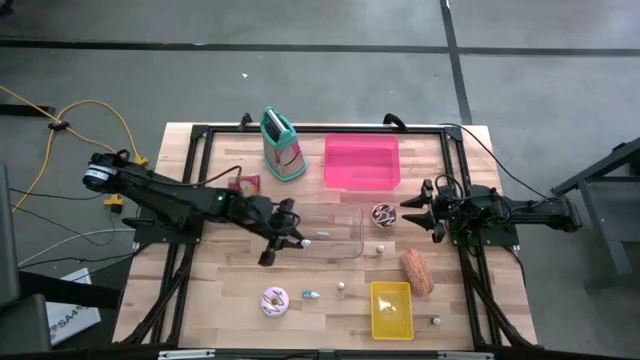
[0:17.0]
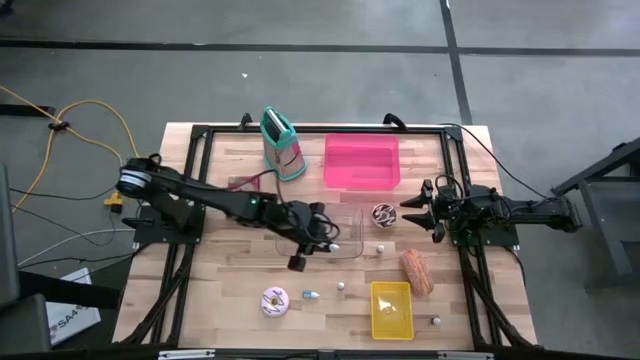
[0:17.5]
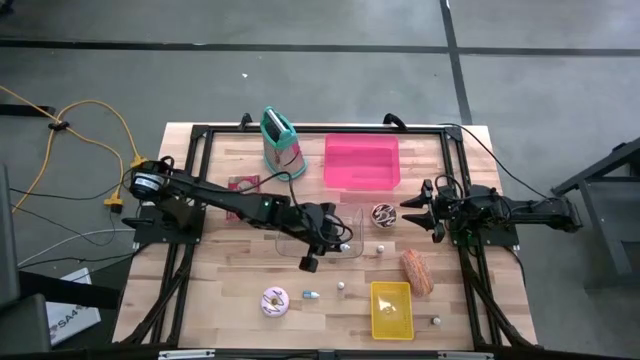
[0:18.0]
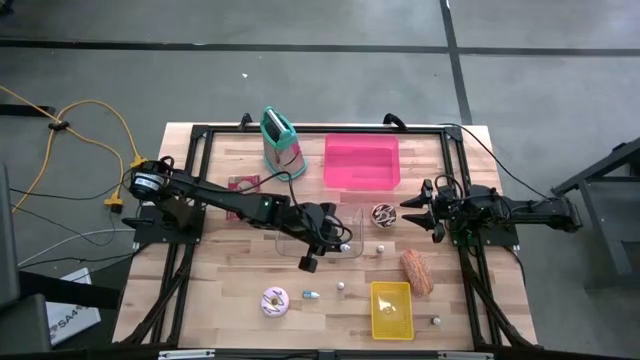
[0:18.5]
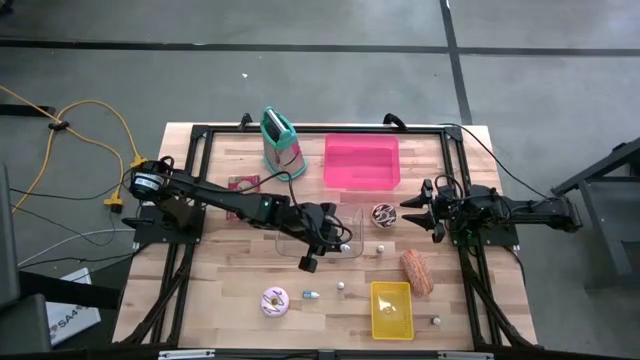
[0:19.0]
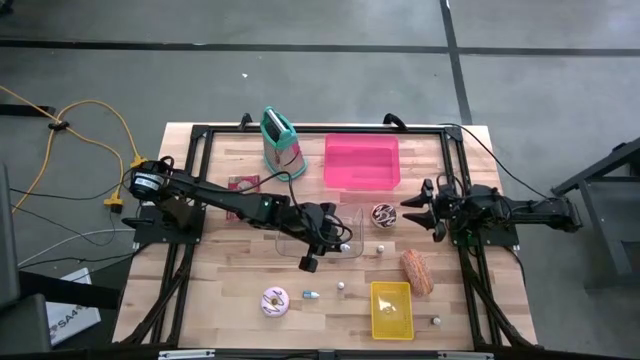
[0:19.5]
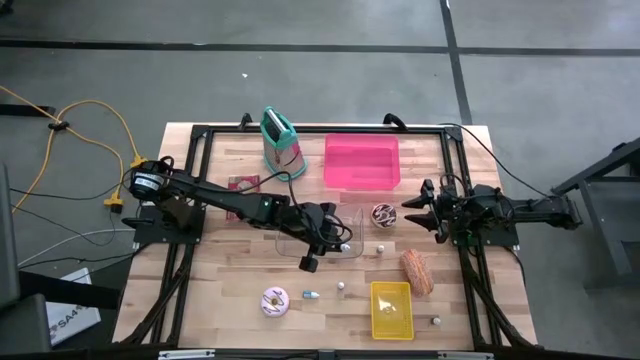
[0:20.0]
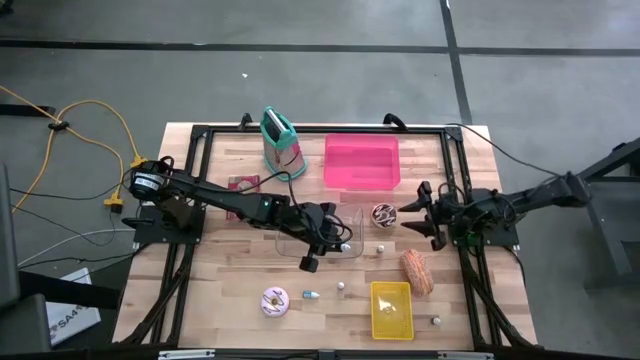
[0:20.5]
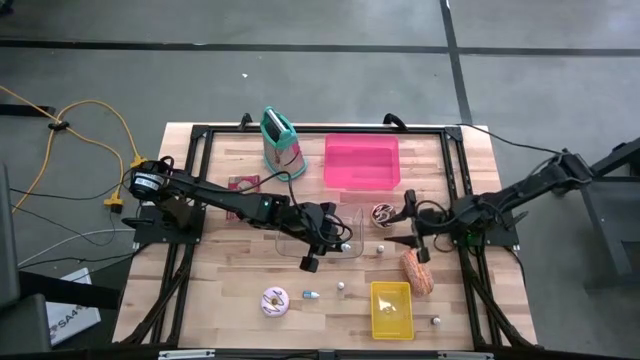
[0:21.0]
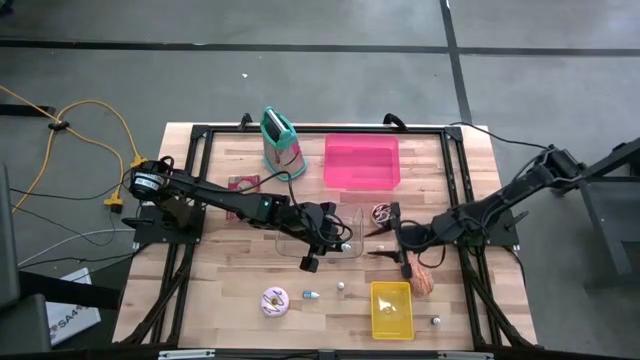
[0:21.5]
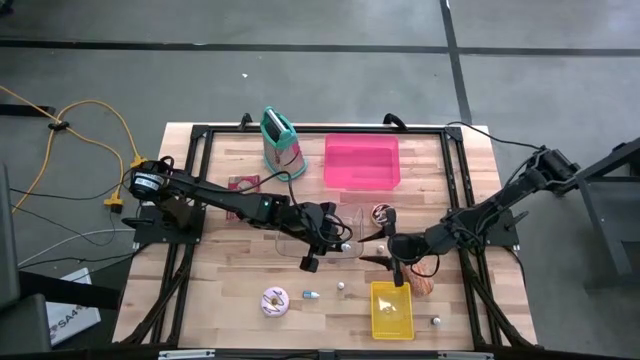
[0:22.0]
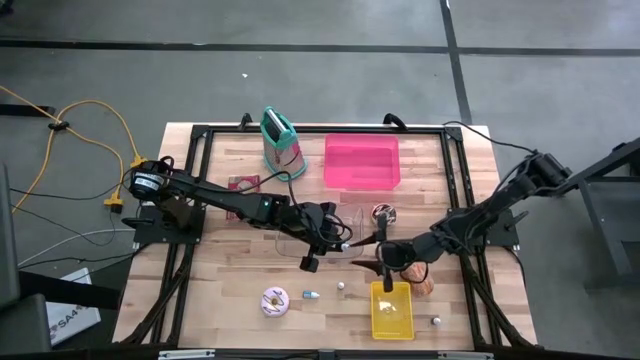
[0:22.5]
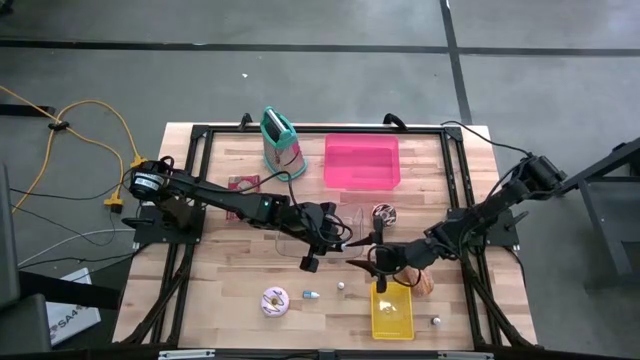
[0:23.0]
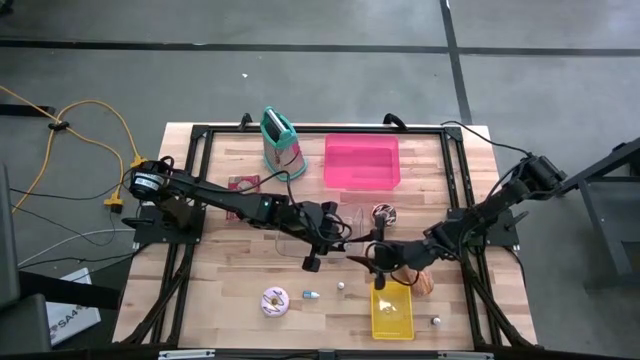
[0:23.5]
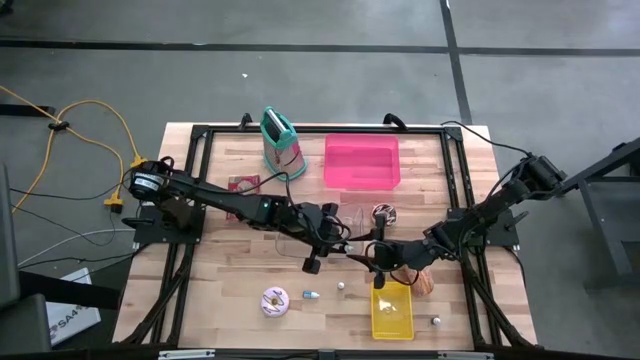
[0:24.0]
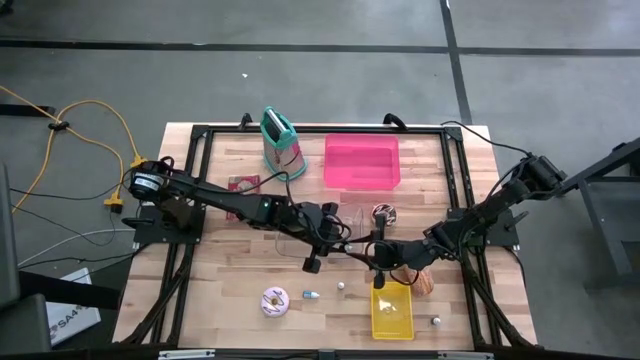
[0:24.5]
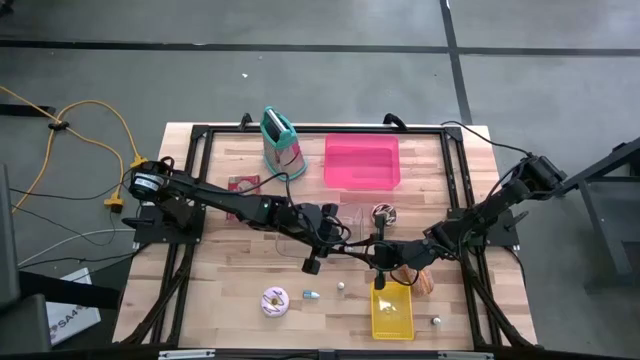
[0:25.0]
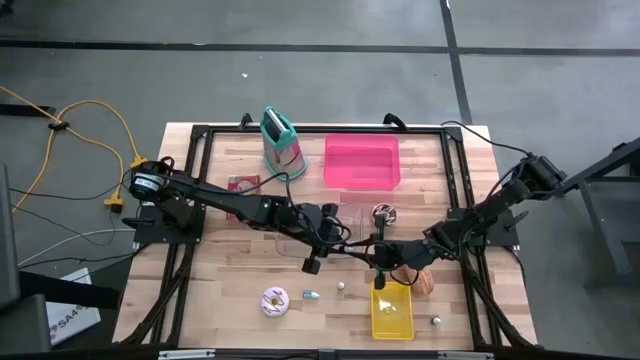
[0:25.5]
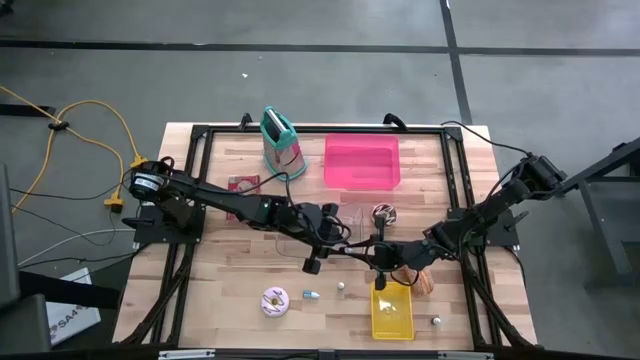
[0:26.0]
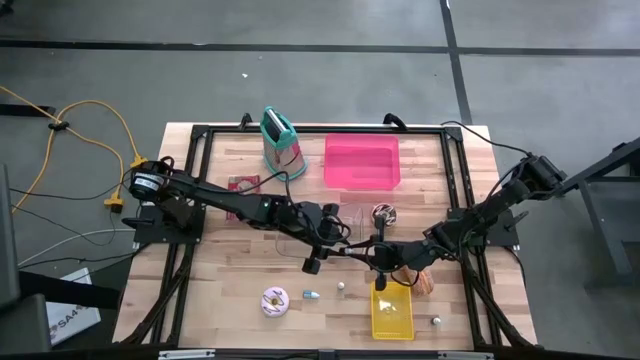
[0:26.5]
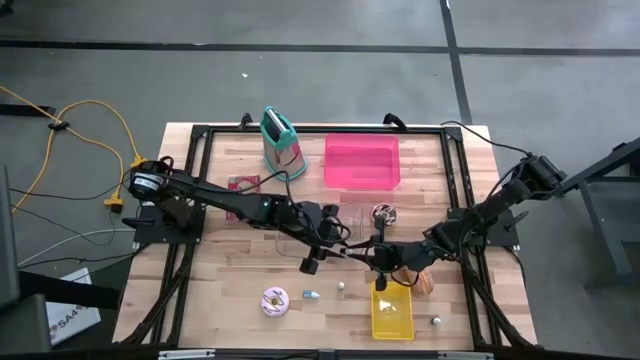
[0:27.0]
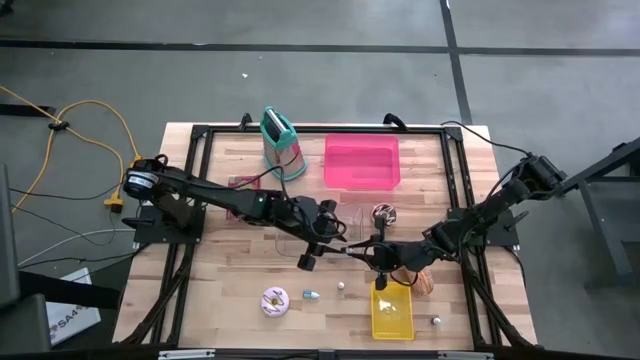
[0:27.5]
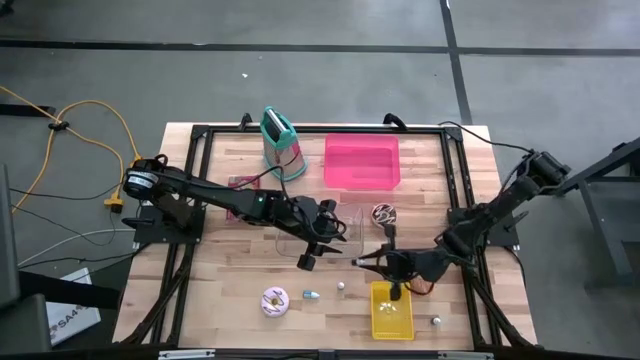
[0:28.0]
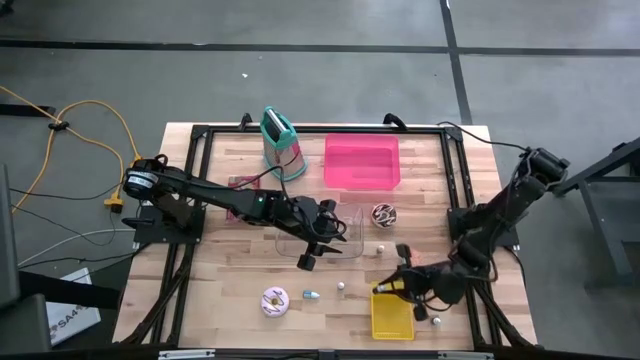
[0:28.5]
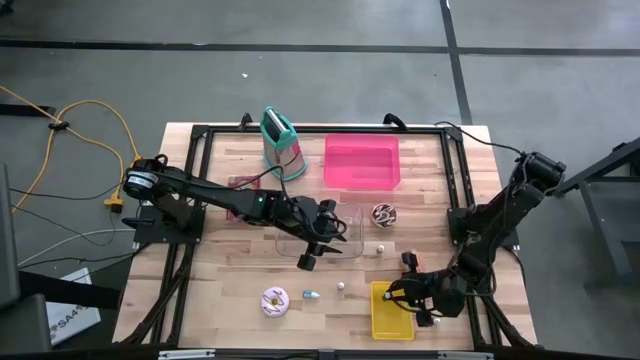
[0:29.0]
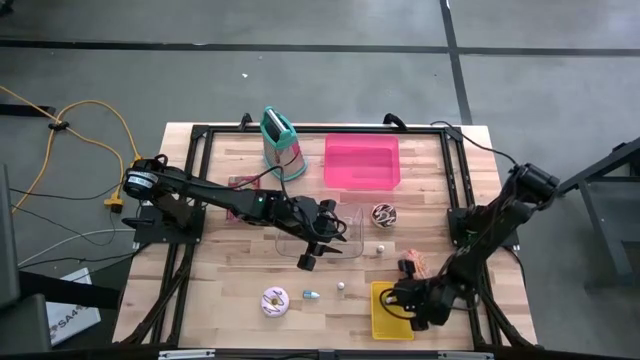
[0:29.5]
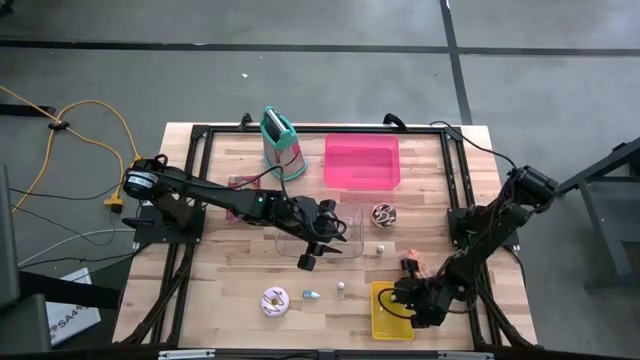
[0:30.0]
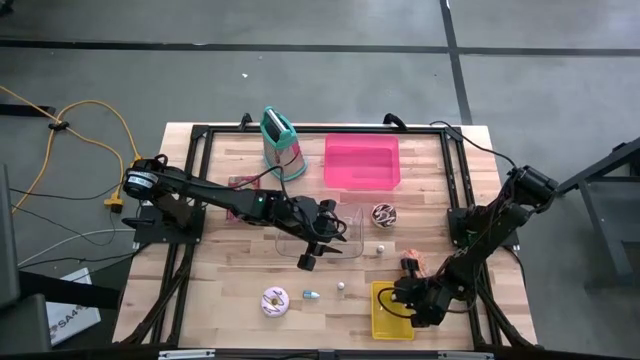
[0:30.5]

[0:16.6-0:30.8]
Put the top black food coloring bottle into the yellow bin
